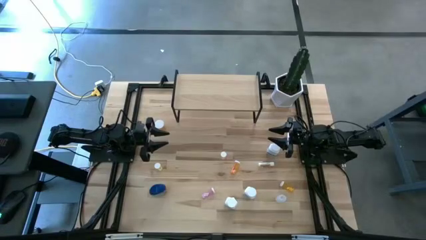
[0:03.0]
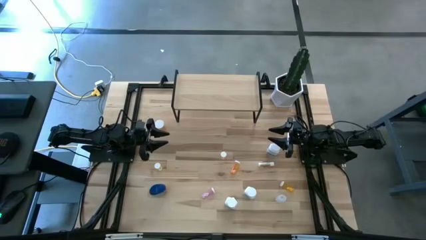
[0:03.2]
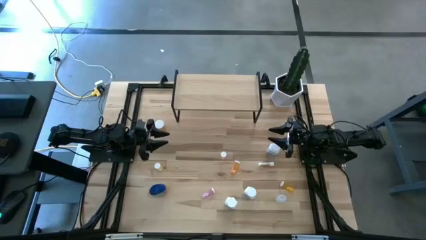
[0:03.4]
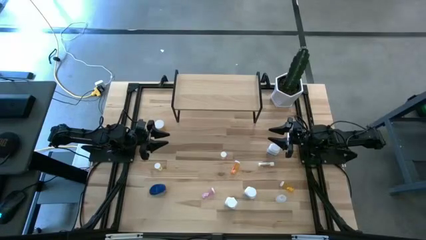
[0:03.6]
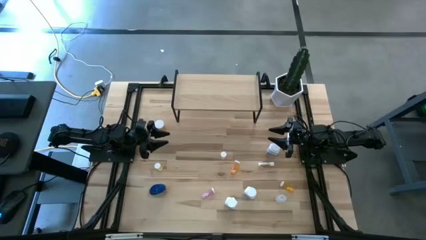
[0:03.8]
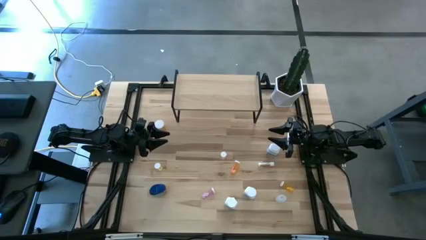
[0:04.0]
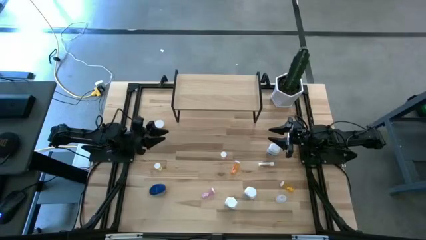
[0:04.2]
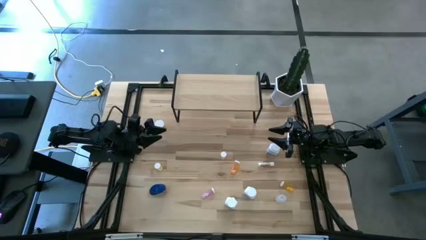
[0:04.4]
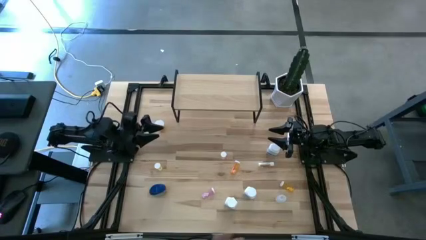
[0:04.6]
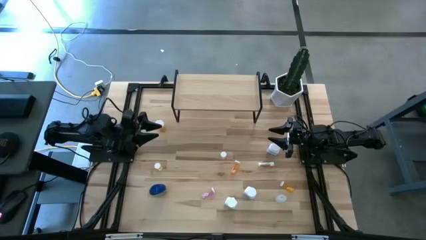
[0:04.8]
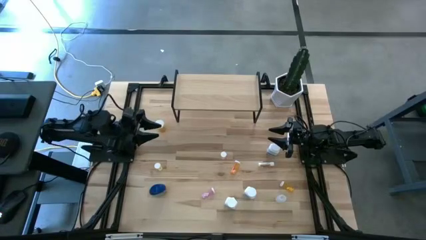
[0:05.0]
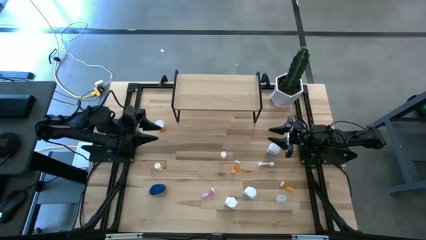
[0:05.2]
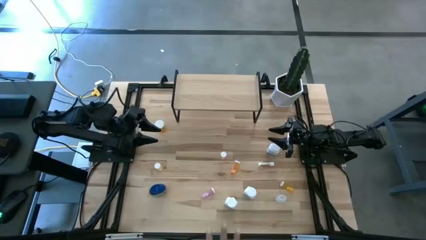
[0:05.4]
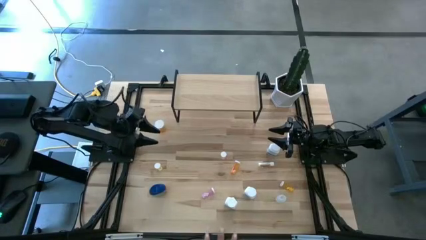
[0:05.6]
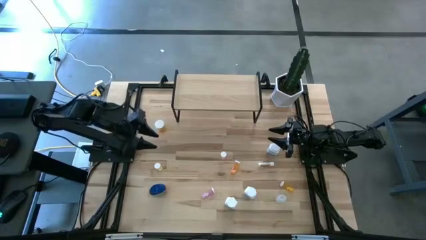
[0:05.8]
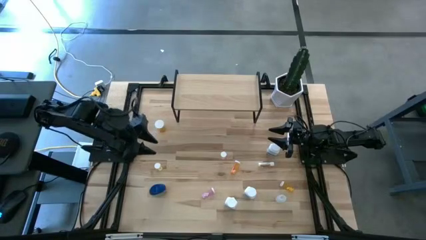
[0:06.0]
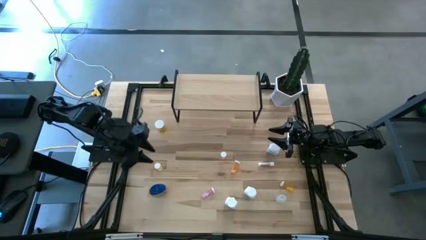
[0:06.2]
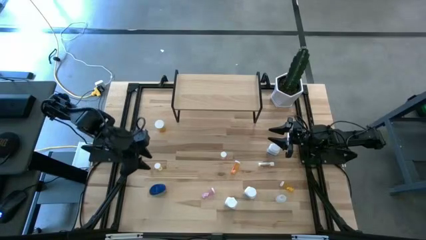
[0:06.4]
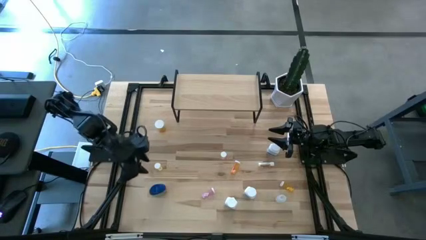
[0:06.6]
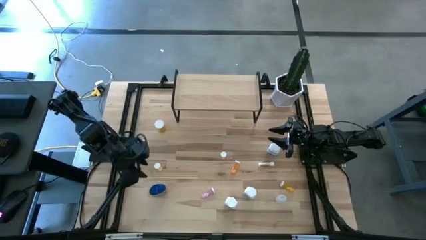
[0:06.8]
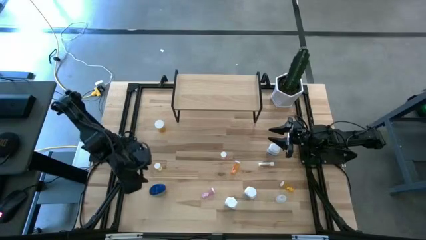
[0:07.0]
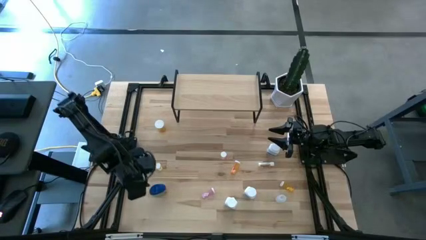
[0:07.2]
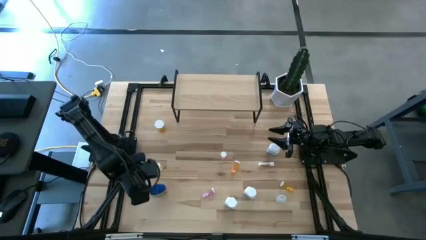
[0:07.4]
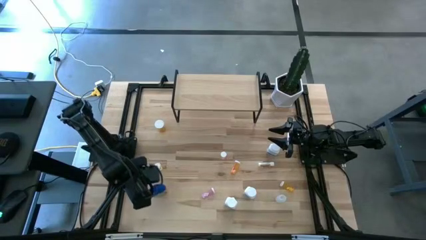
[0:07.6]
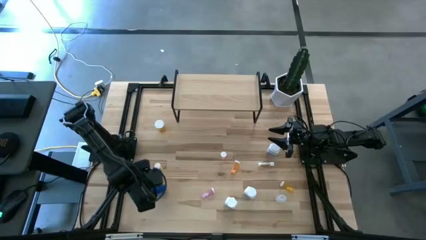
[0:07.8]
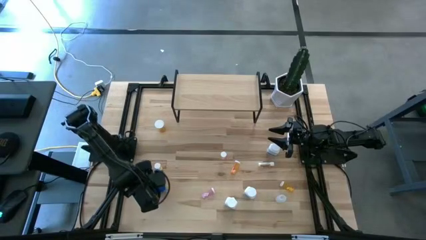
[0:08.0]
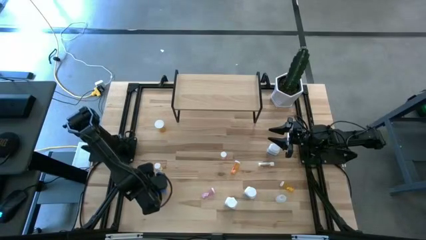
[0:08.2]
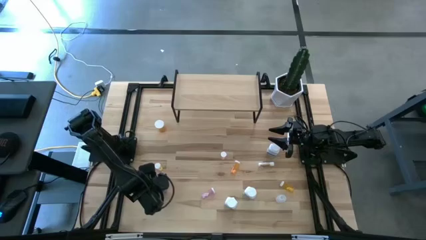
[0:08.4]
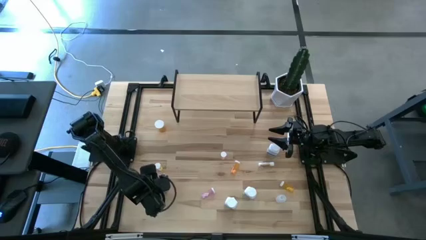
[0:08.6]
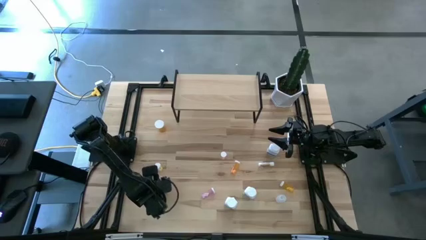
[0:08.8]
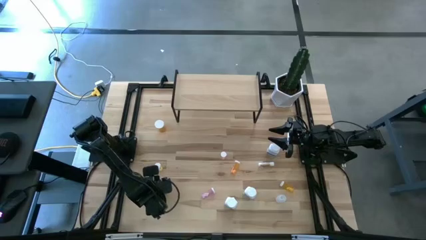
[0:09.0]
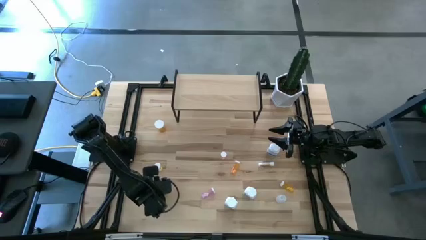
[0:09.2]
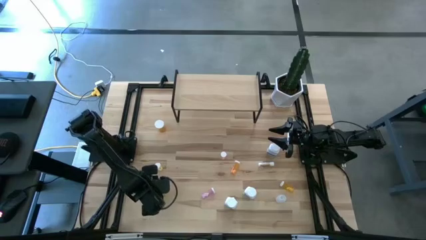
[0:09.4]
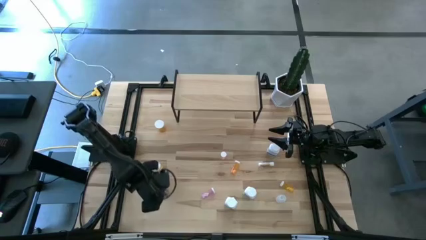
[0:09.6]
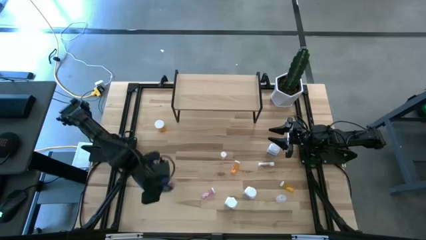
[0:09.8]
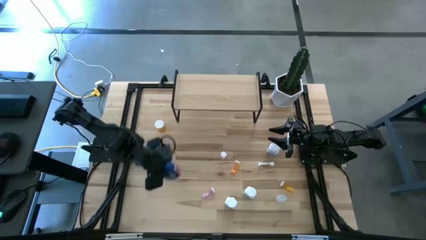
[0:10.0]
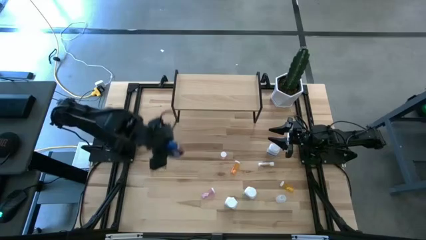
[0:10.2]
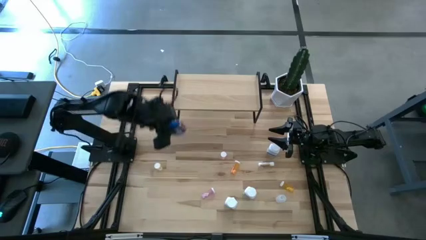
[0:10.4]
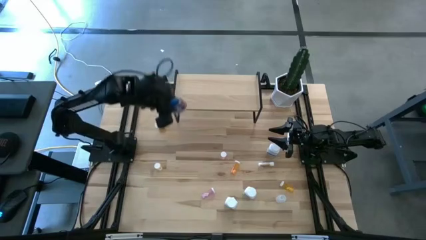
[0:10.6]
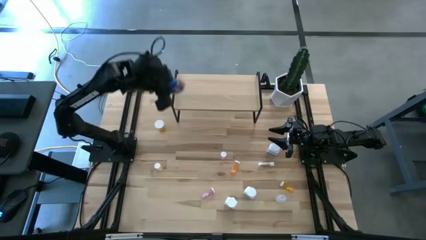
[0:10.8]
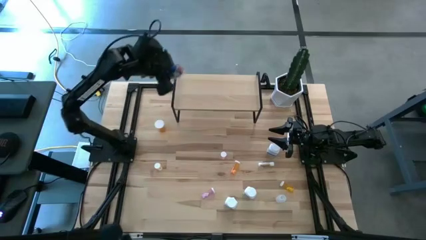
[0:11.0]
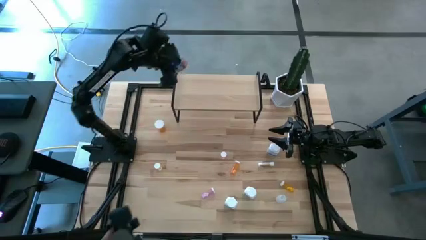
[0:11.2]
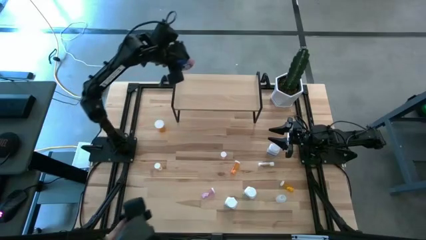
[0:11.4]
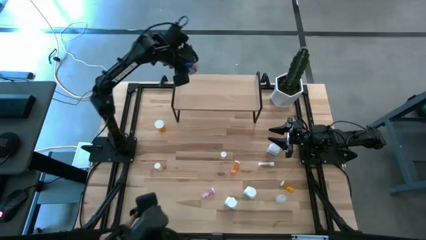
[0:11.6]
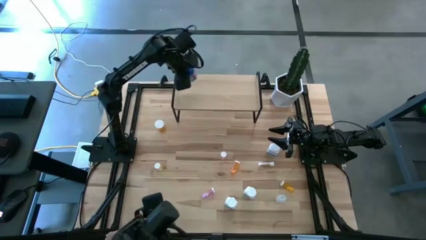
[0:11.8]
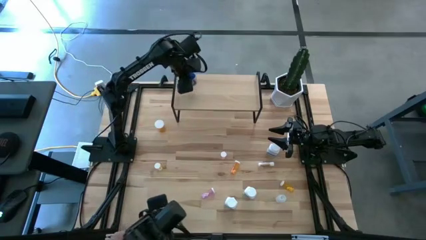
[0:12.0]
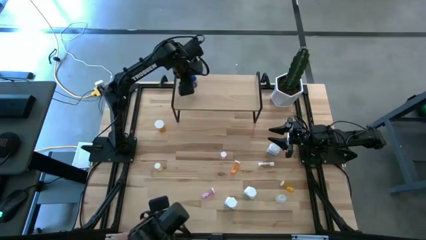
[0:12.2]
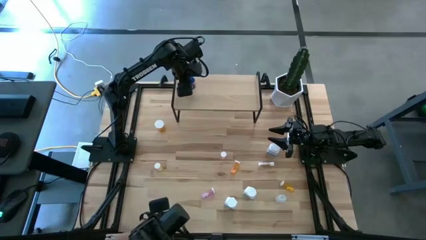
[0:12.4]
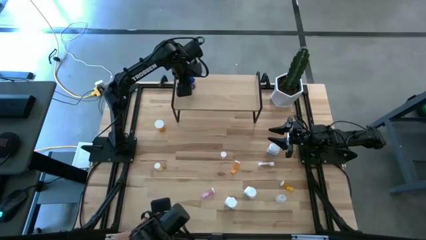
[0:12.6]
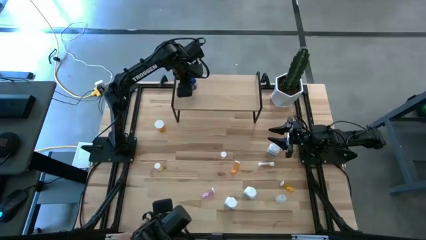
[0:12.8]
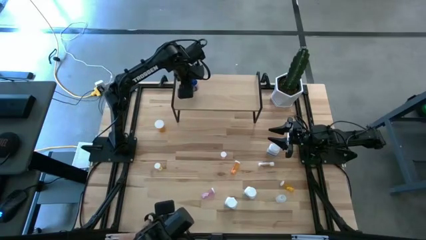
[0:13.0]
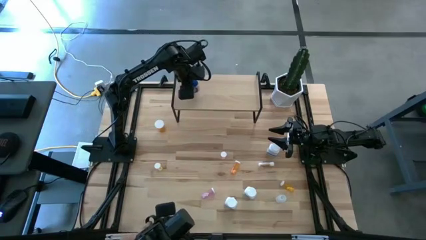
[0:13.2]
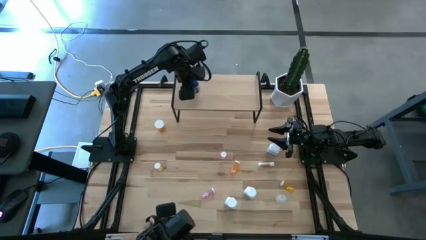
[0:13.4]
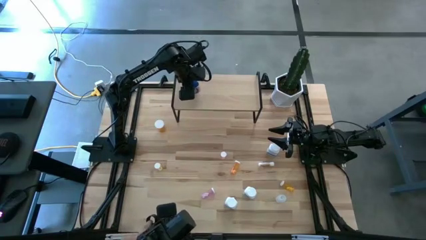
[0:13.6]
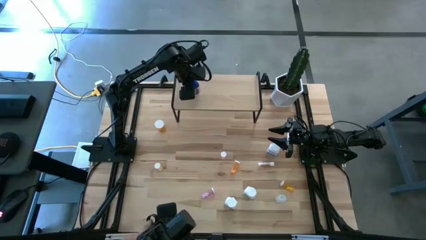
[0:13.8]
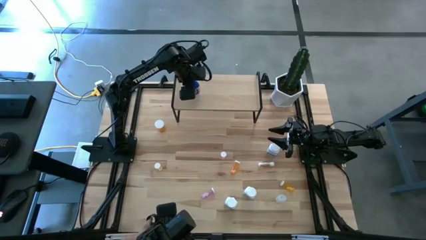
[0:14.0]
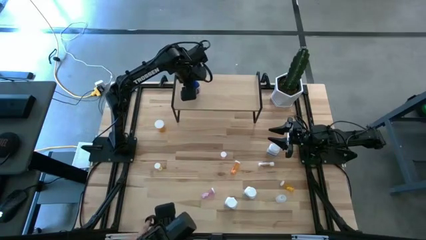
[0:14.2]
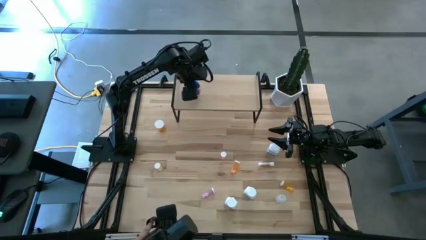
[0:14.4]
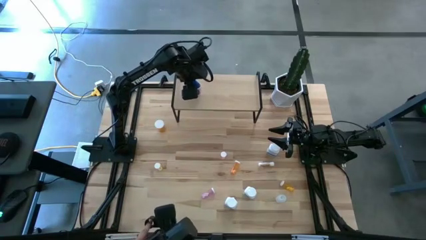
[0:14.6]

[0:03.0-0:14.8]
Task: Pick and place medicine bottles onto shelf by color
Put the blue pill bottle on the shelf

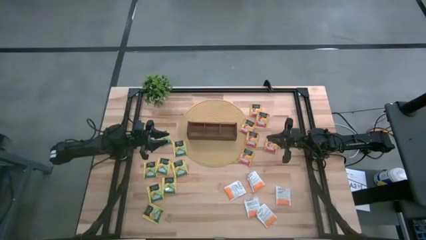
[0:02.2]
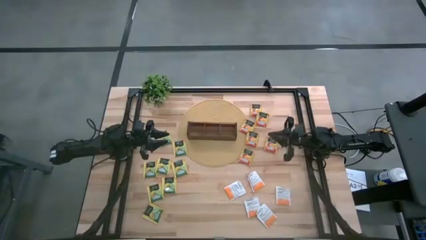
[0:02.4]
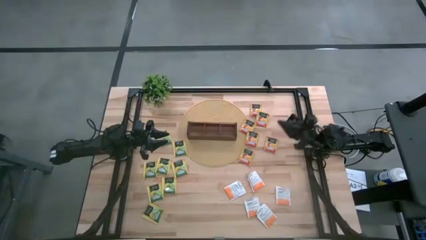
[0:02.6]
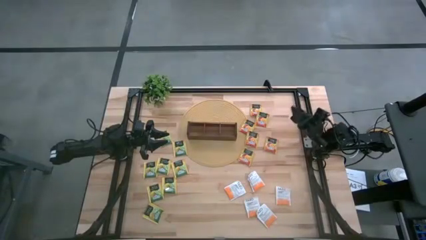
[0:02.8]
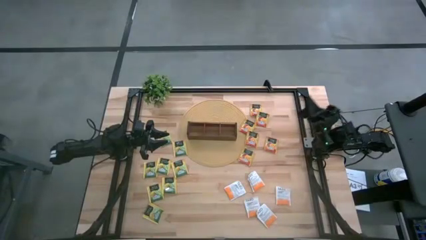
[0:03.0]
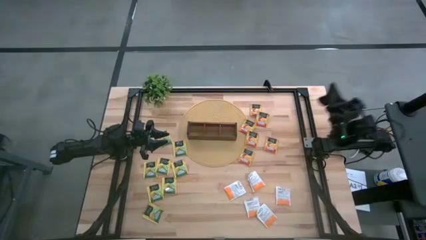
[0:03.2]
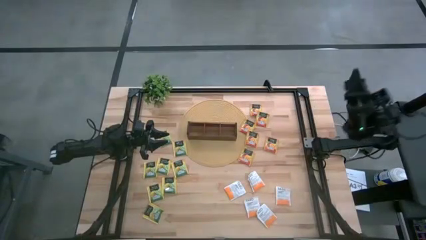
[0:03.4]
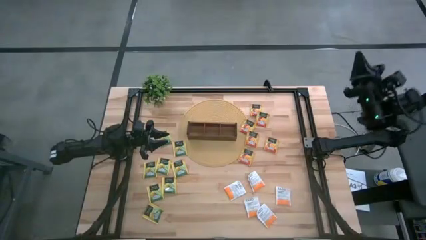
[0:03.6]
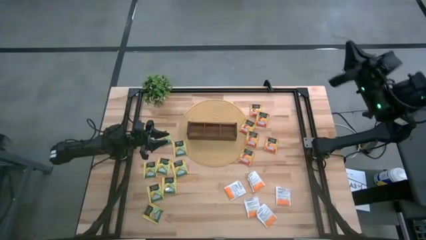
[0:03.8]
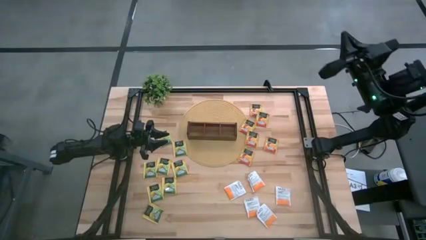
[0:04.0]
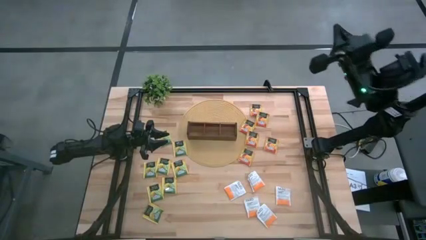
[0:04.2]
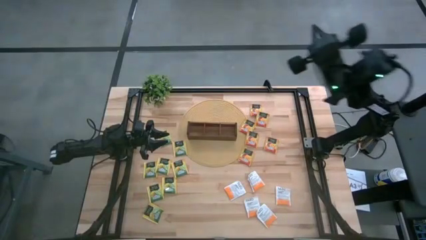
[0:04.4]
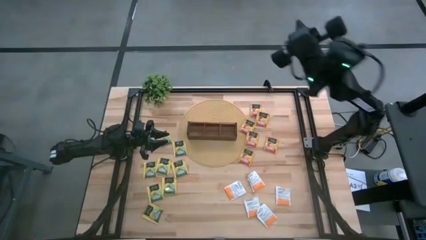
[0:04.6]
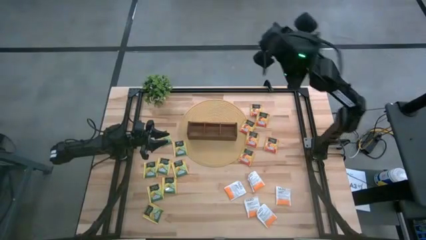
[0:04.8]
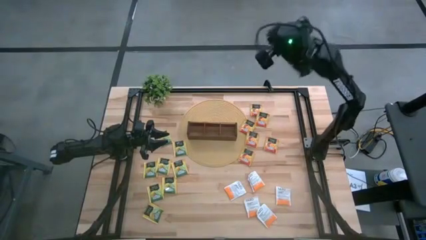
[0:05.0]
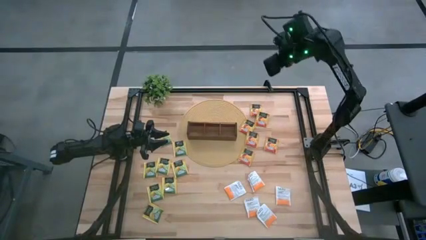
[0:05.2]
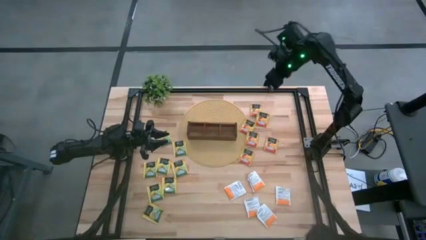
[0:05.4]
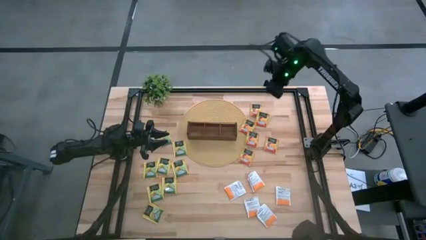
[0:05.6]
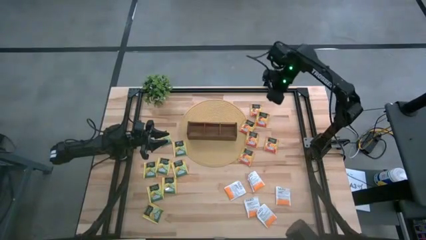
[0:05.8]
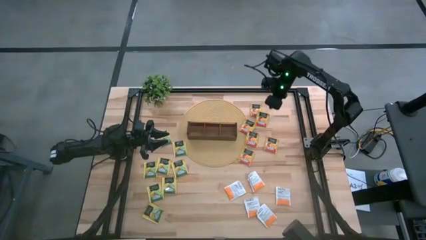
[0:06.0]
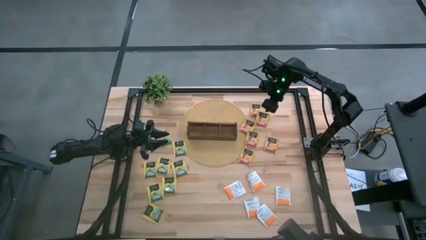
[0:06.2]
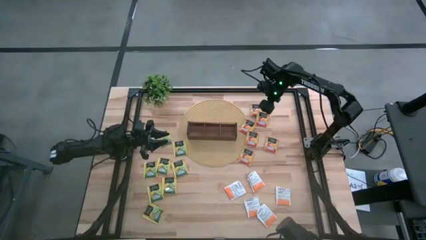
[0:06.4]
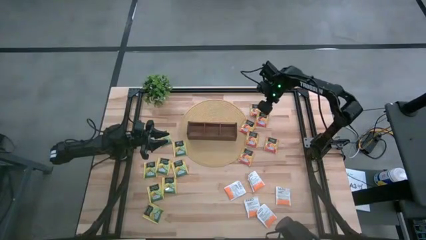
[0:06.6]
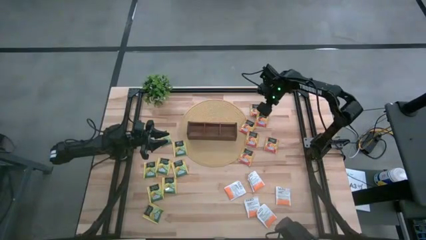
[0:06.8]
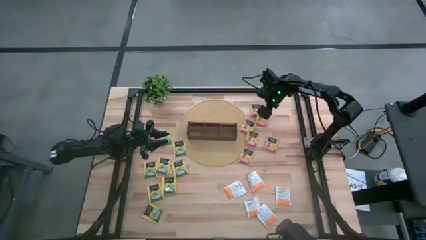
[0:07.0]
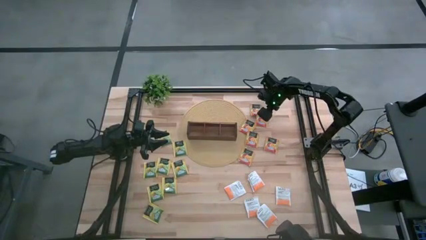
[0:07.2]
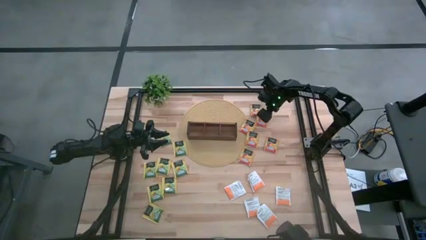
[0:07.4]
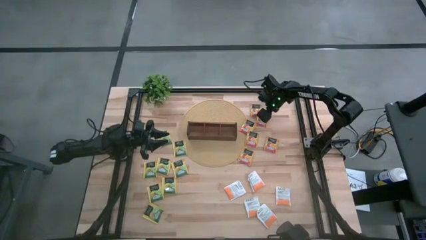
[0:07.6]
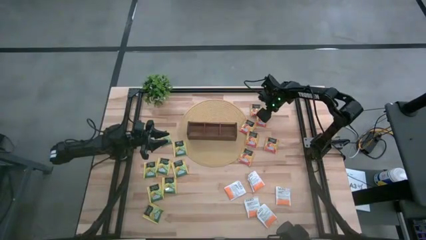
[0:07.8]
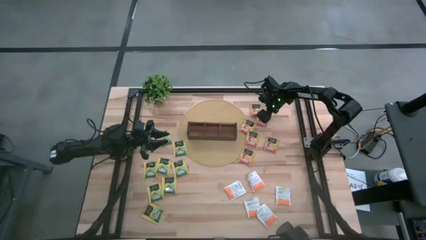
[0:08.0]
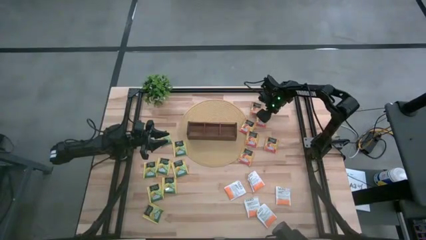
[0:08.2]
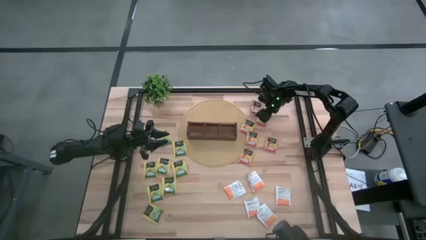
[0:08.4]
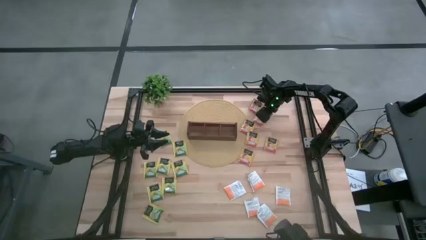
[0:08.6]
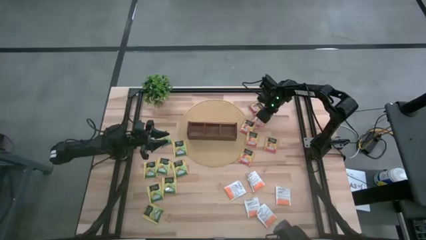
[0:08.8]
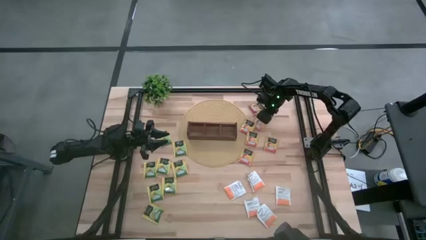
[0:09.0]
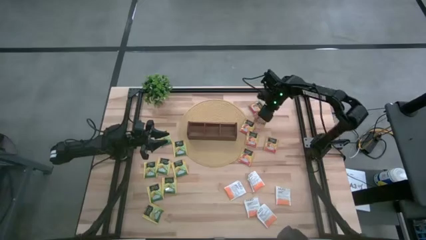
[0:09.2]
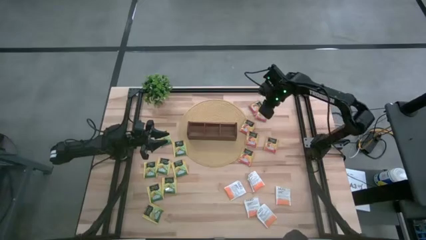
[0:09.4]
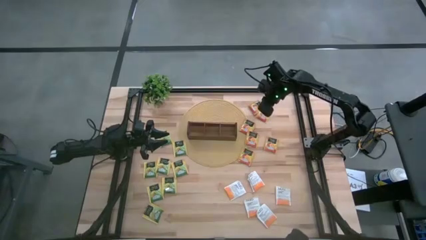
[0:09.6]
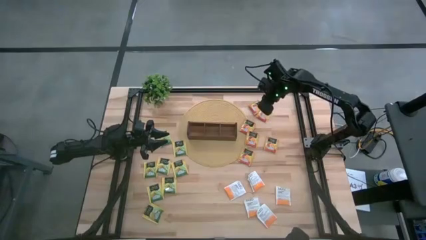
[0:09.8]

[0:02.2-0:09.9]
Task: Pick & Place Tea
Put the dark yellow tea bag into the right section of the wooden organizer
